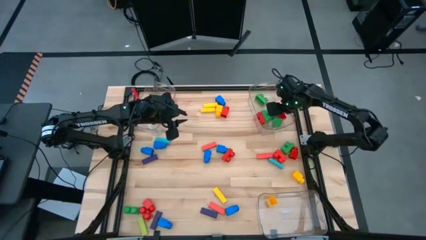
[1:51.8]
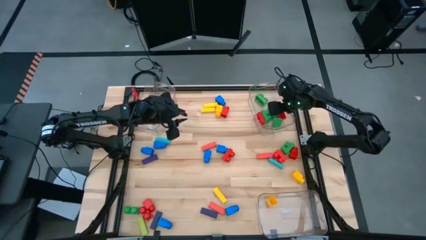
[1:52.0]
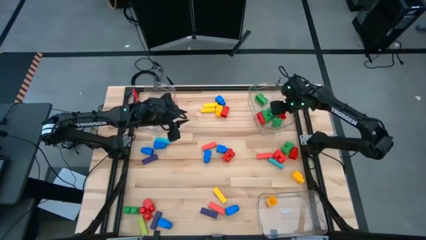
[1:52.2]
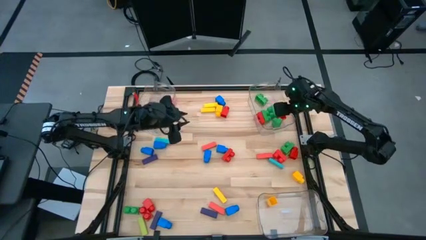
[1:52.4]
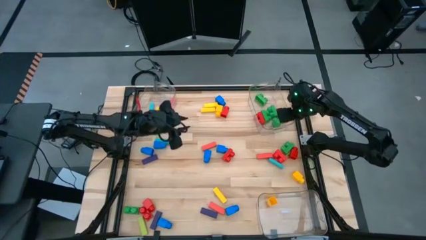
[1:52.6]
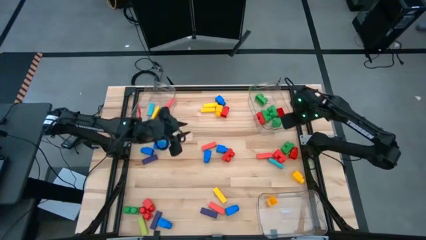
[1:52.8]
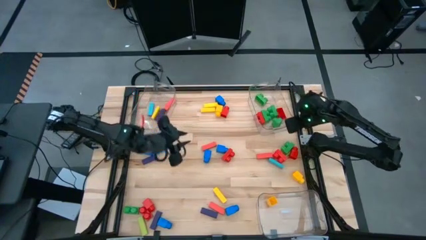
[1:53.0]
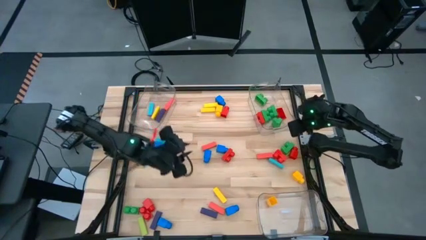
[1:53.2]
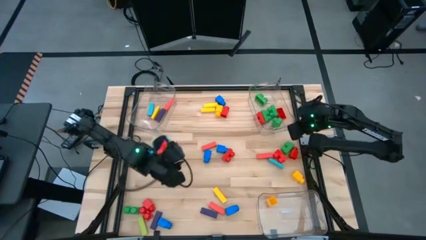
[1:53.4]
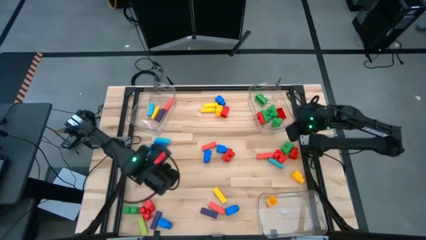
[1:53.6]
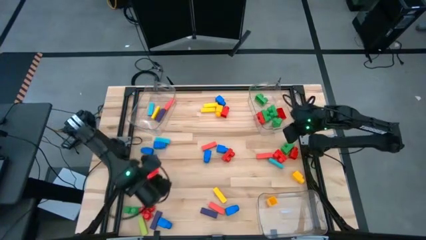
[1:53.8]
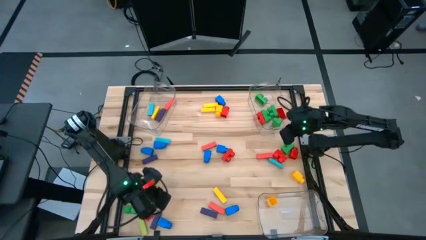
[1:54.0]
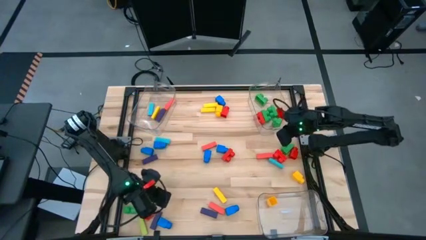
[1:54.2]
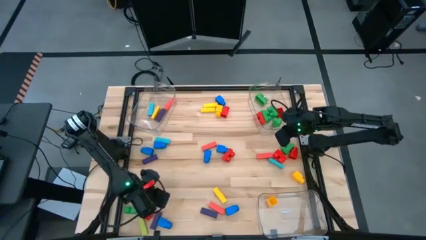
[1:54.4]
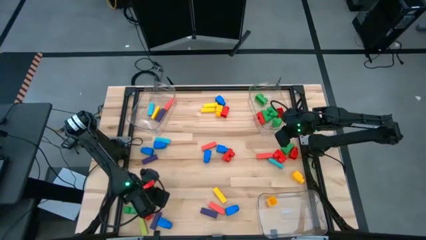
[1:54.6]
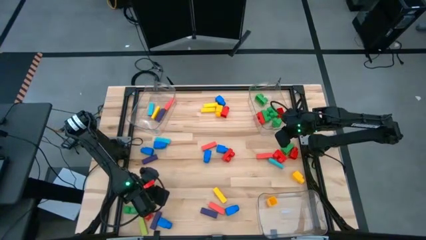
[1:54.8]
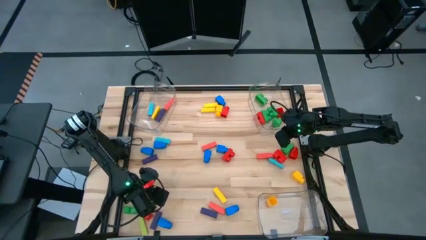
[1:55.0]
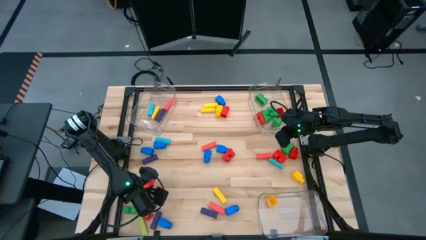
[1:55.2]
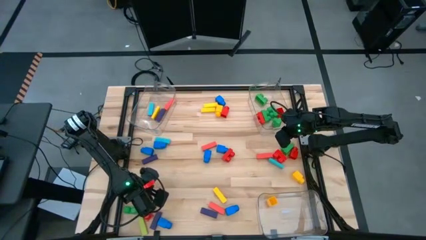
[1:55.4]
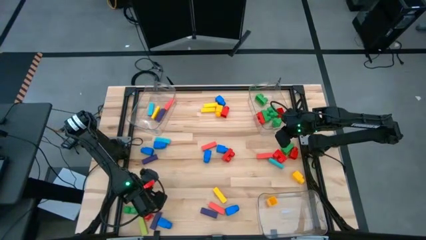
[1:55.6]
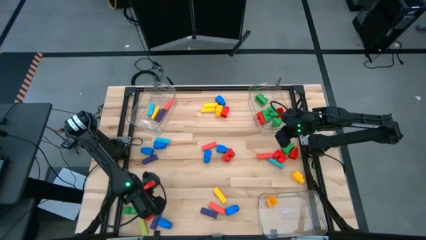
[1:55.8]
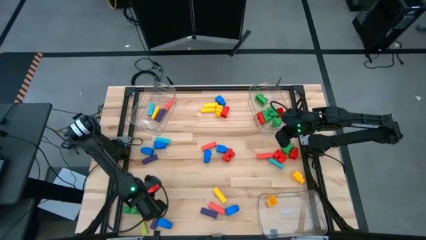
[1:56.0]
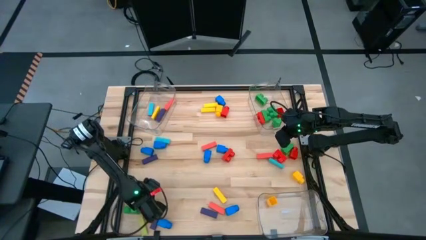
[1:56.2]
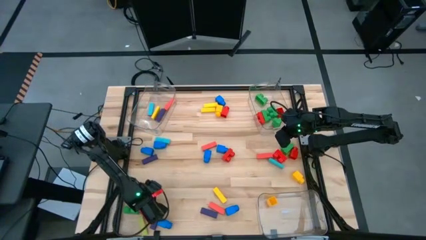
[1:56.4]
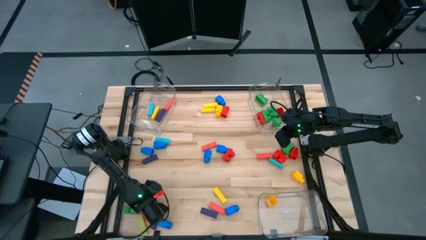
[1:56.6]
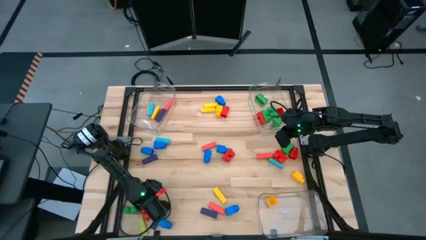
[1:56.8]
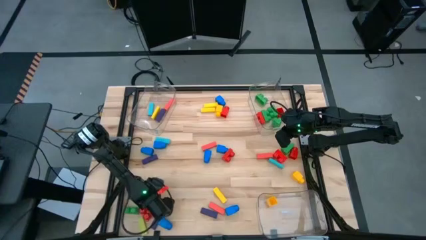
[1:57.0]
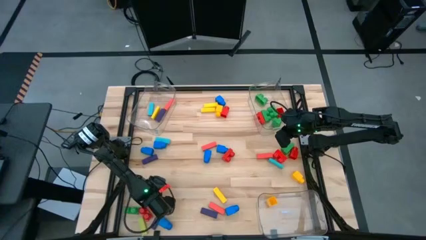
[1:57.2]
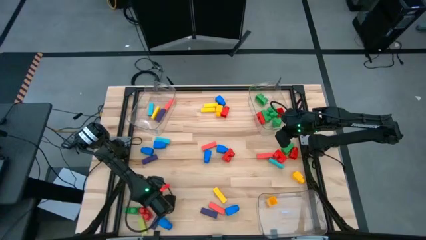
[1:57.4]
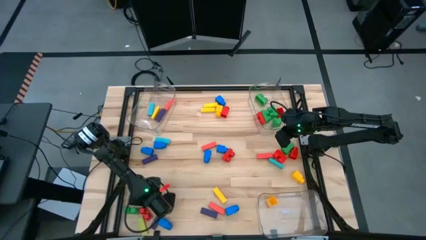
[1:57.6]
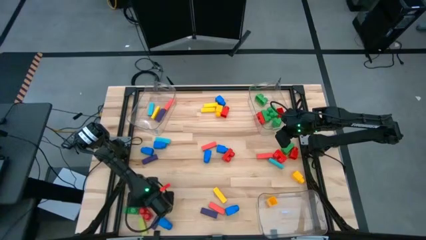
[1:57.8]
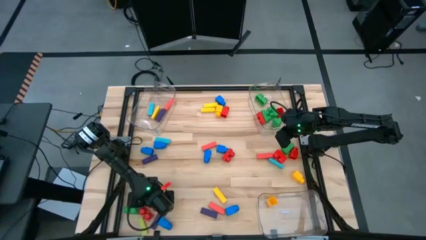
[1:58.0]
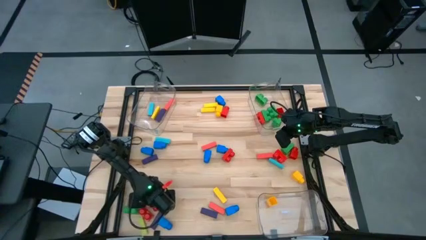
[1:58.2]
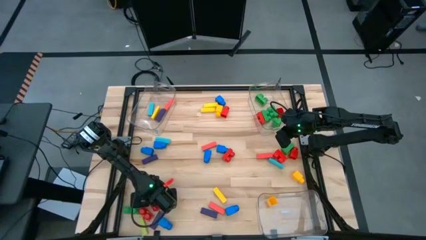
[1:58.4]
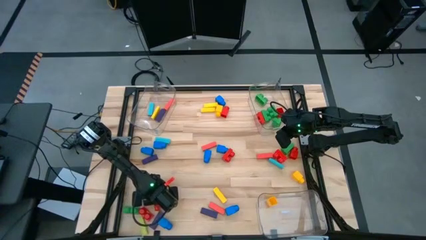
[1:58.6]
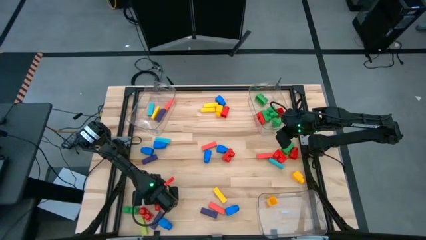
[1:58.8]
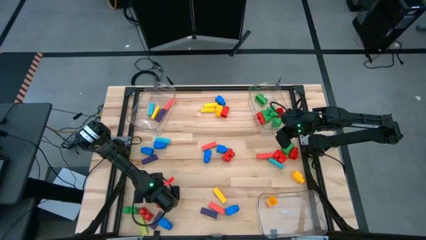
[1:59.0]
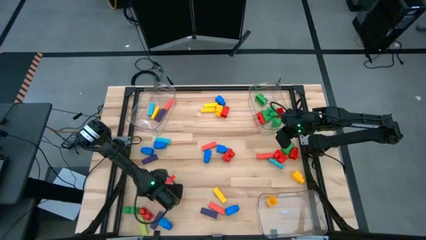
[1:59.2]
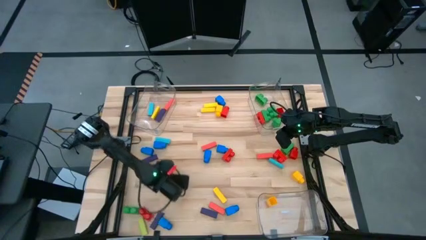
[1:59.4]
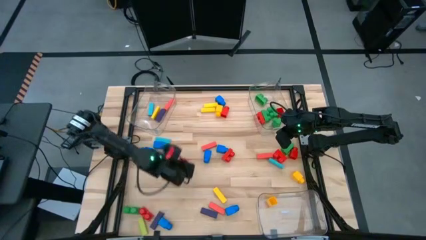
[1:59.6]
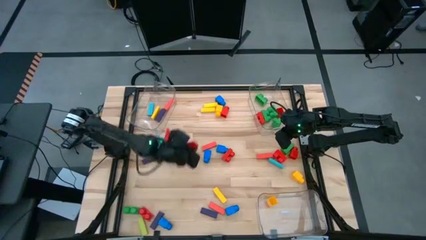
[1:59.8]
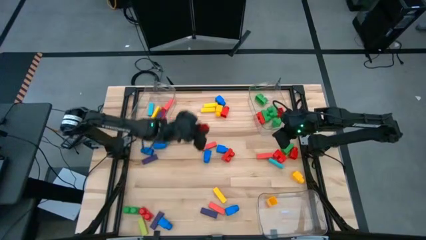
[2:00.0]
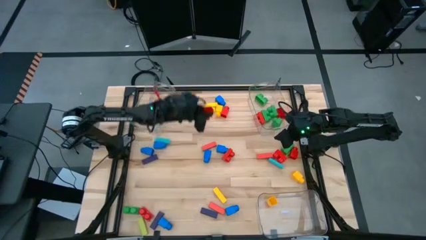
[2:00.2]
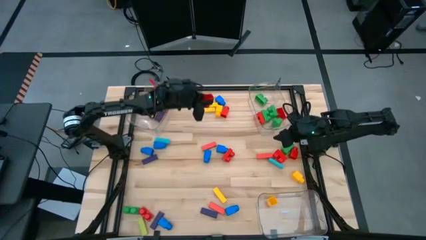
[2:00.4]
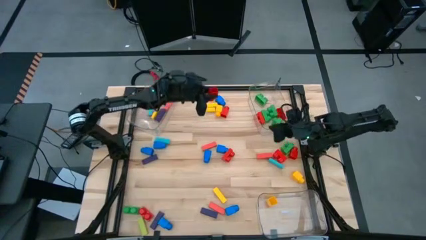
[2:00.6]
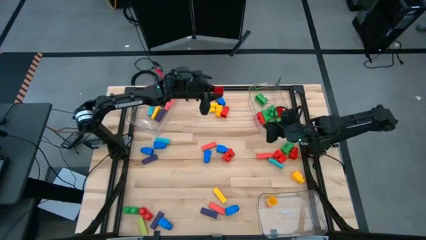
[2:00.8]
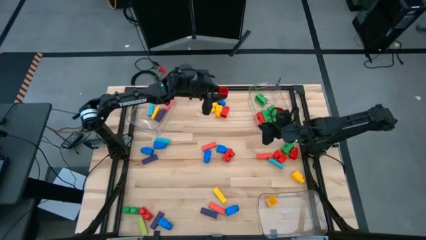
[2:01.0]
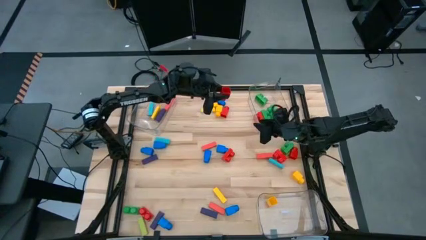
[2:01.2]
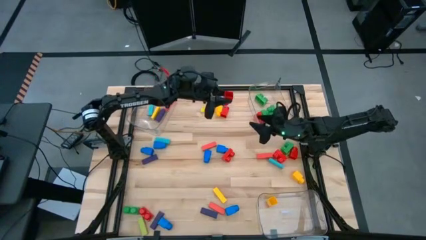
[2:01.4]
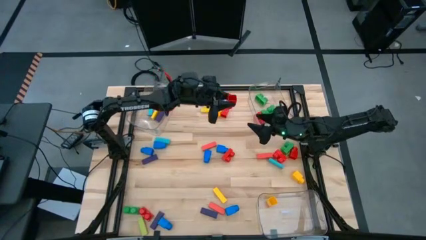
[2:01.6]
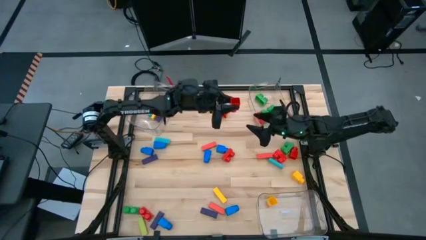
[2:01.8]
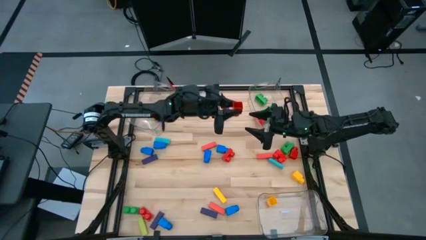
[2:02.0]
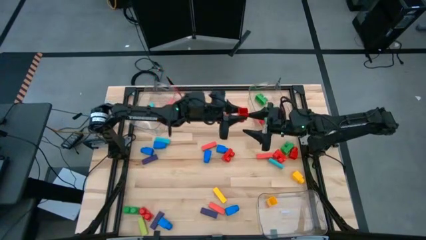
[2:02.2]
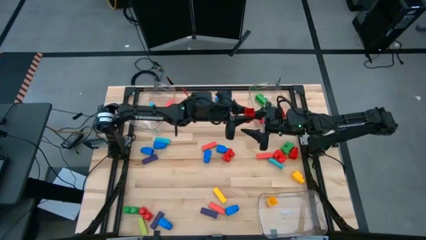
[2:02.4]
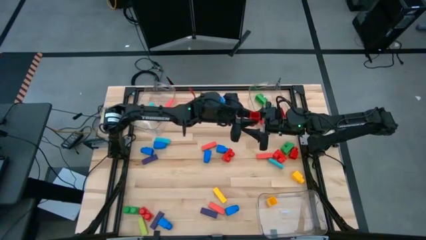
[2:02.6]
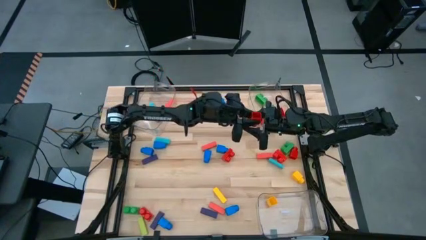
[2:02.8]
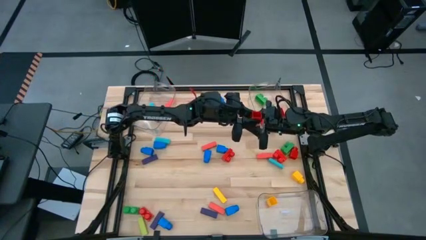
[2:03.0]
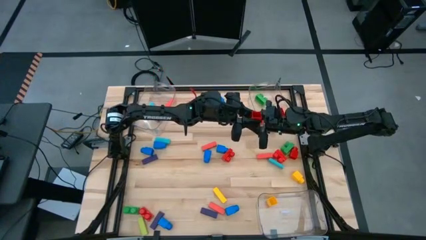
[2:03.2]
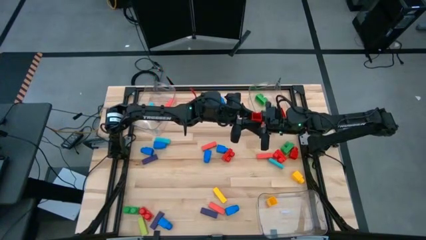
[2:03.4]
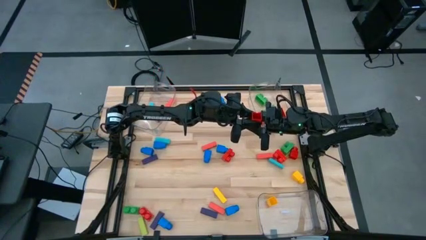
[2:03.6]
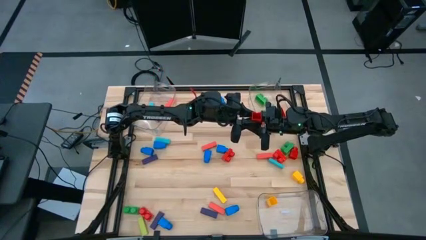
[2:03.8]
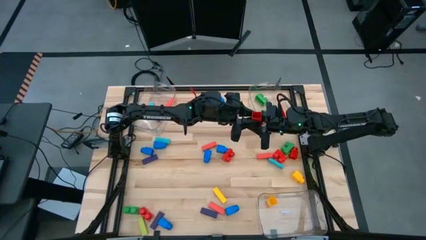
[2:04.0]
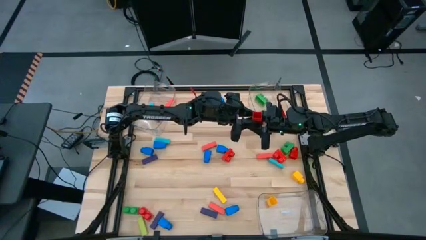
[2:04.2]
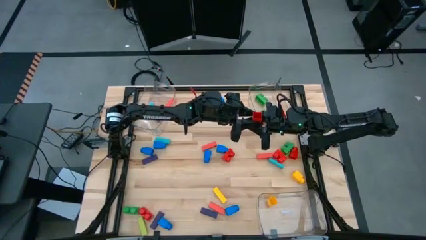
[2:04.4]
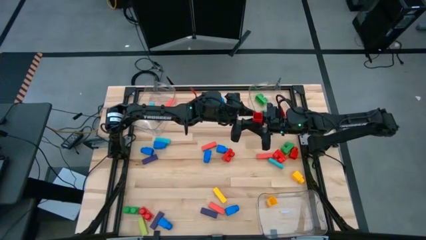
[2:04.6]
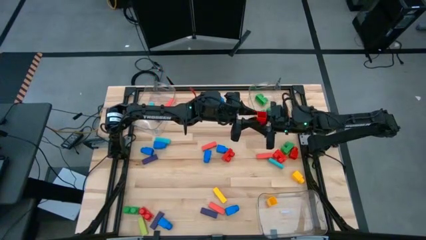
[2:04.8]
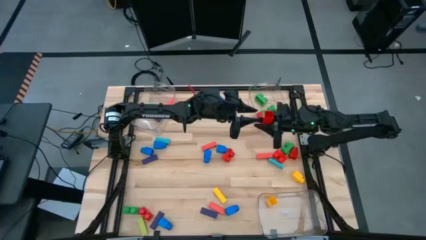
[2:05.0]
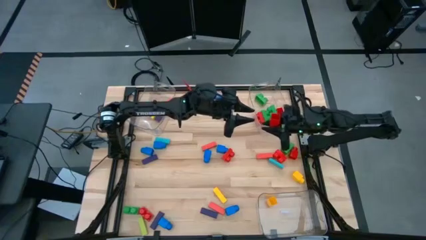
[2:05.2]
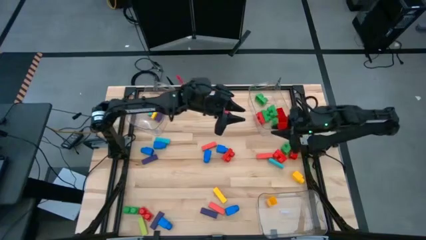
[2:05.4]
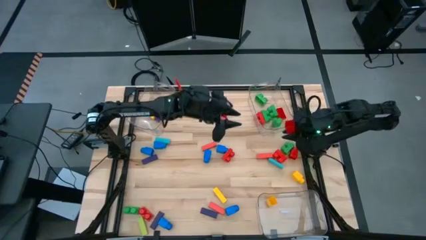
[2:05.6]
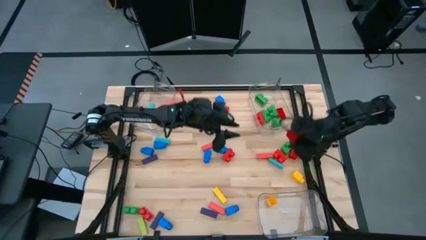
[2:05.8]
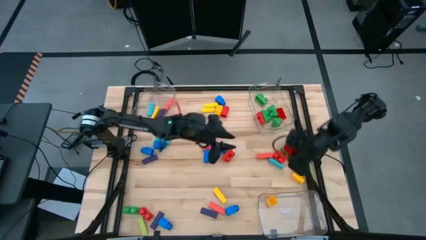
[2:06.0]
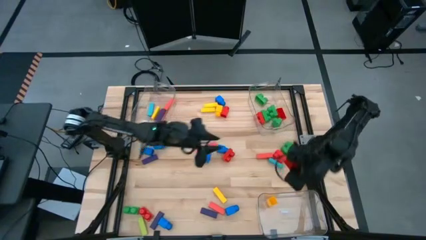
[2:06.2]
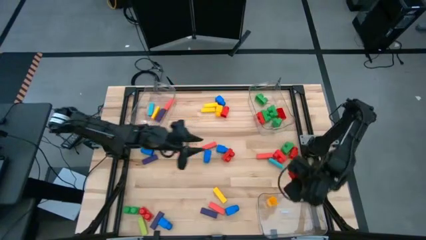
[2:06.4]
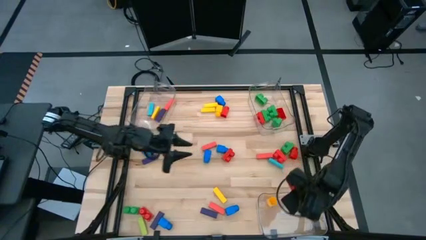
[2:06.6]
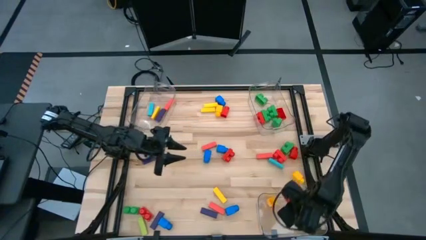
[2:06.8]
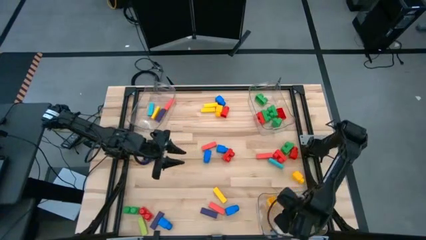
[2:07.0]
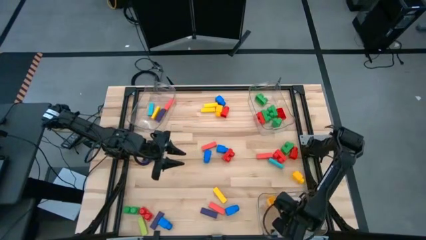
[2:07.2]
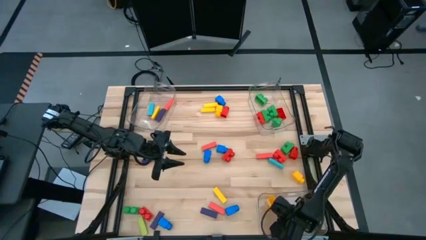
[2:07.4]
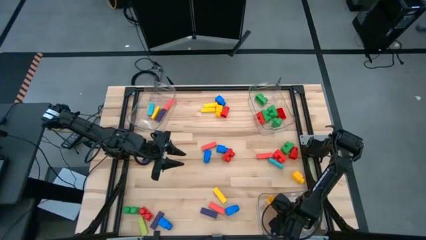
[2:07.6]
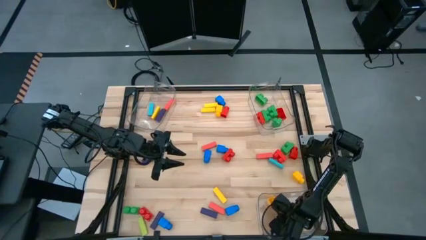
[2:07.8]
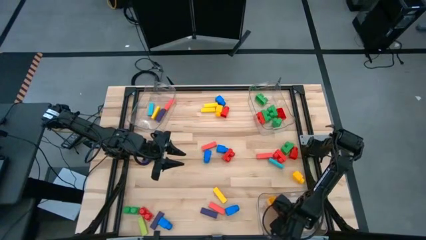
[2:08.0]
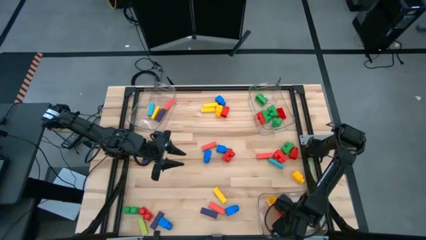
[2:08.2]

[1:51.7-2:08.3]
Task: Sort blocks by size
Put the yellow 1 stud game piece into the bottom transparent bin
